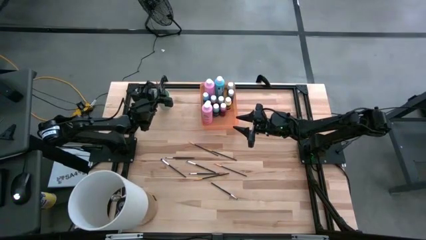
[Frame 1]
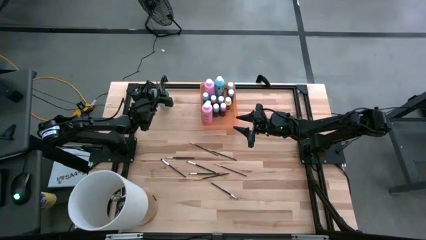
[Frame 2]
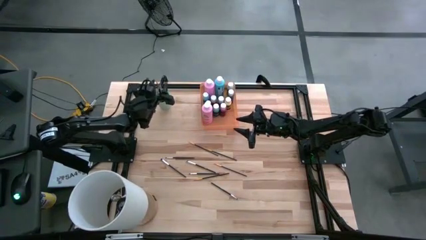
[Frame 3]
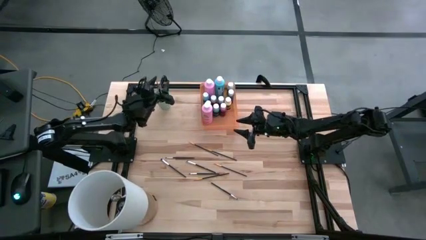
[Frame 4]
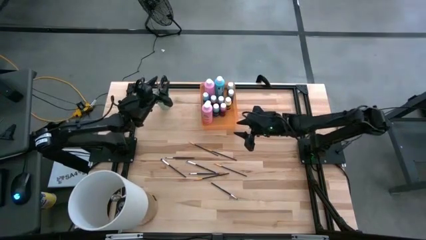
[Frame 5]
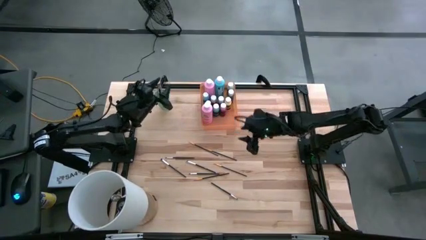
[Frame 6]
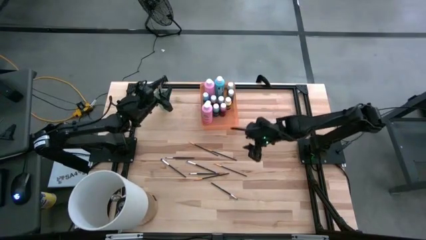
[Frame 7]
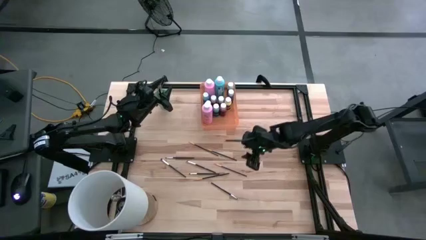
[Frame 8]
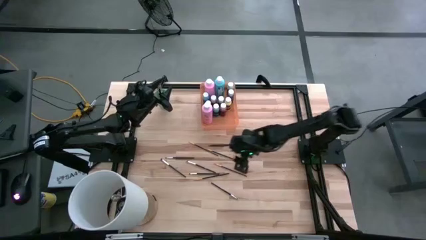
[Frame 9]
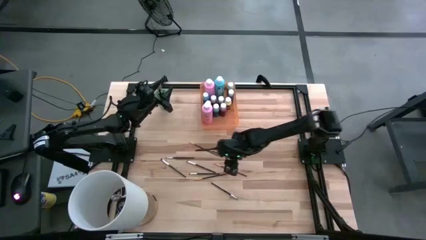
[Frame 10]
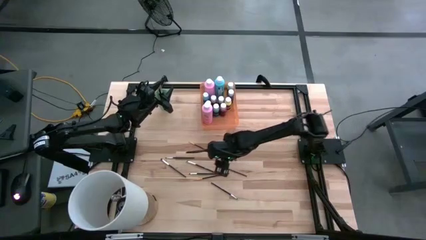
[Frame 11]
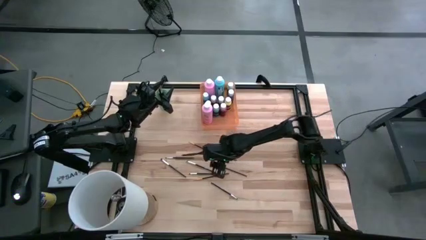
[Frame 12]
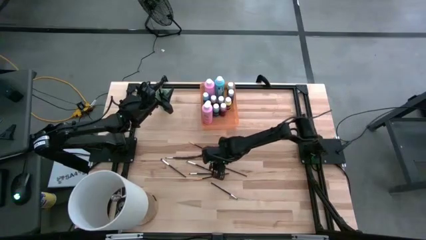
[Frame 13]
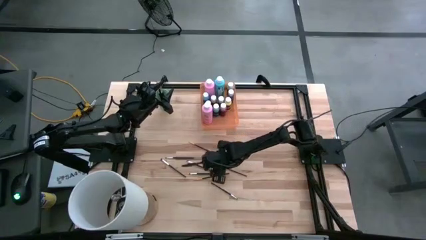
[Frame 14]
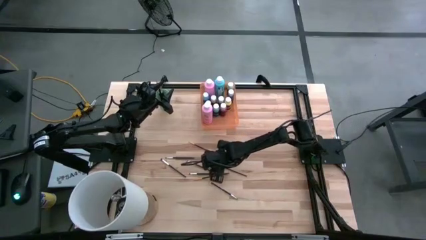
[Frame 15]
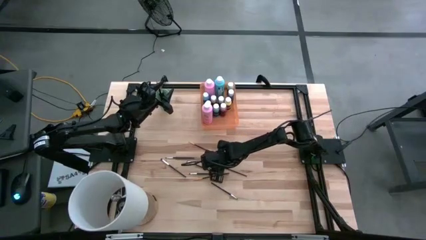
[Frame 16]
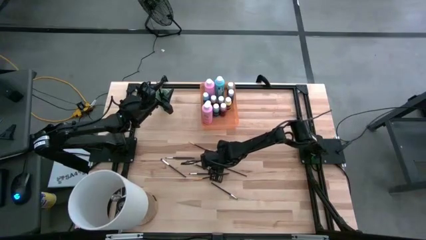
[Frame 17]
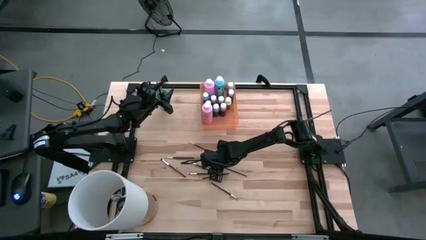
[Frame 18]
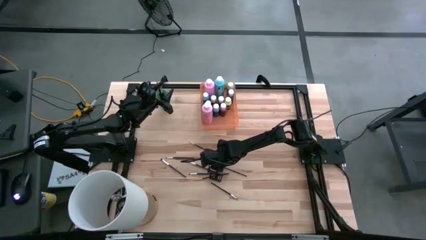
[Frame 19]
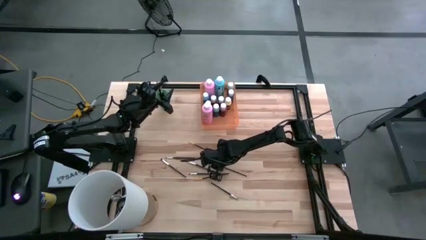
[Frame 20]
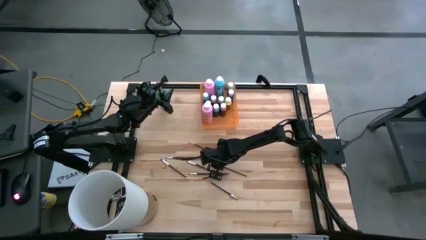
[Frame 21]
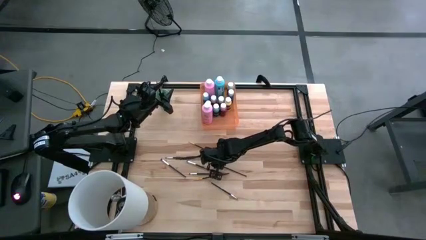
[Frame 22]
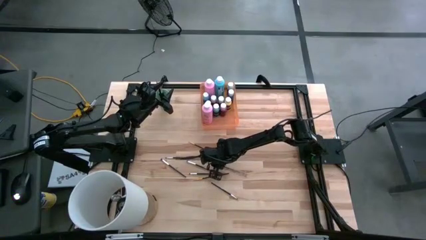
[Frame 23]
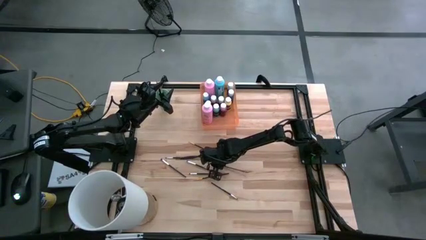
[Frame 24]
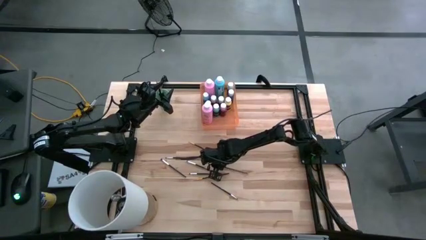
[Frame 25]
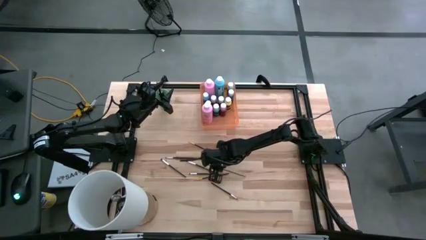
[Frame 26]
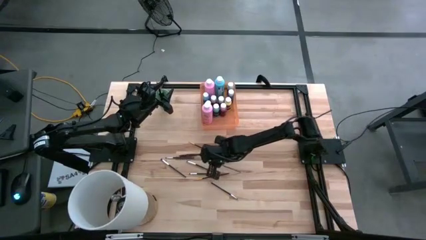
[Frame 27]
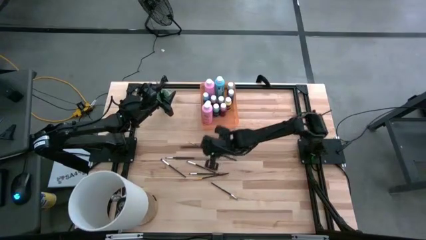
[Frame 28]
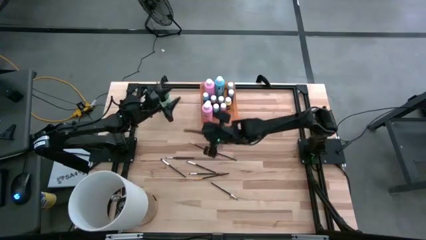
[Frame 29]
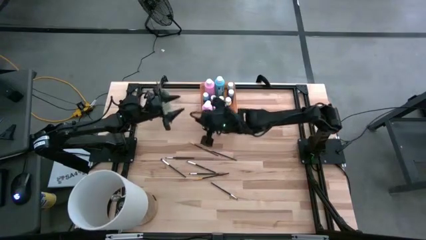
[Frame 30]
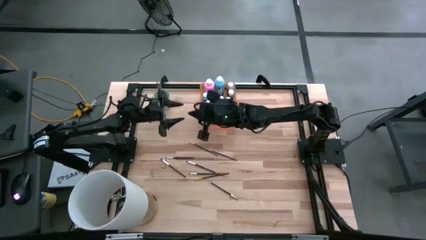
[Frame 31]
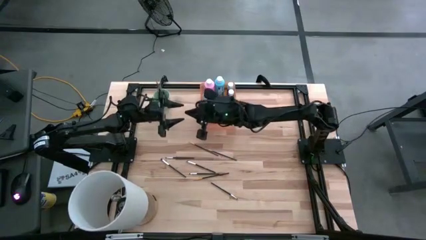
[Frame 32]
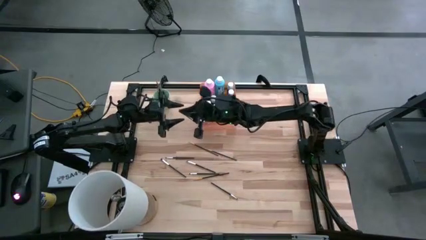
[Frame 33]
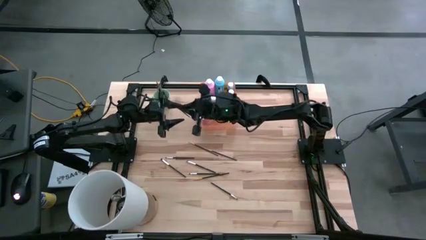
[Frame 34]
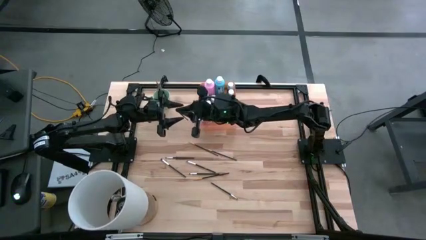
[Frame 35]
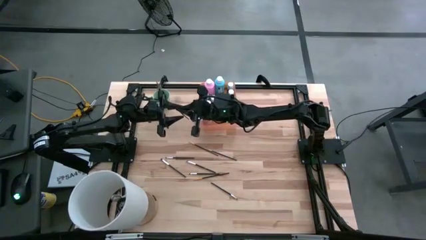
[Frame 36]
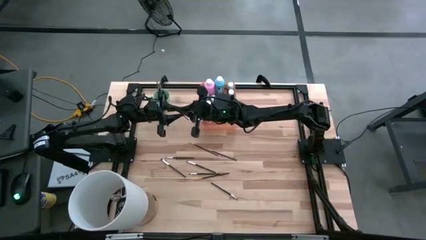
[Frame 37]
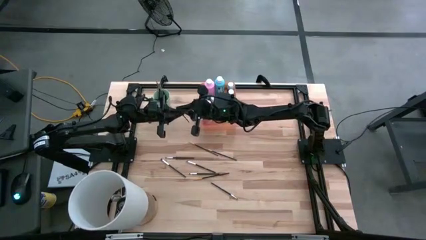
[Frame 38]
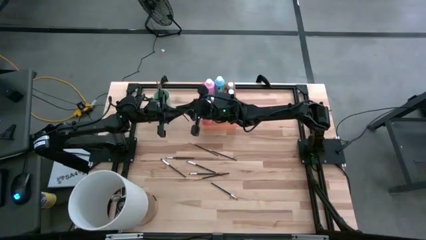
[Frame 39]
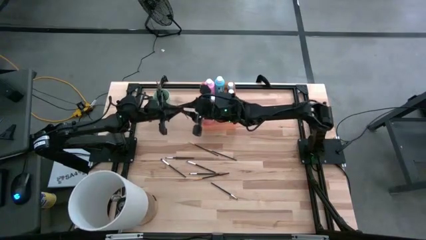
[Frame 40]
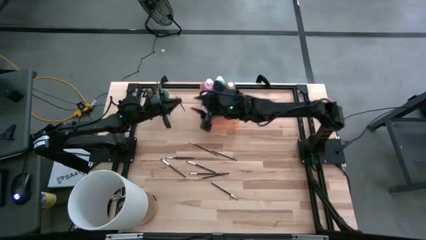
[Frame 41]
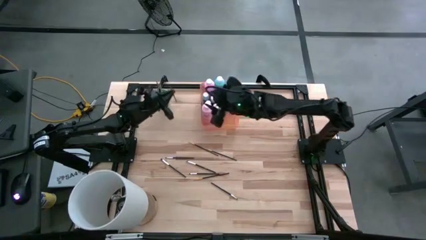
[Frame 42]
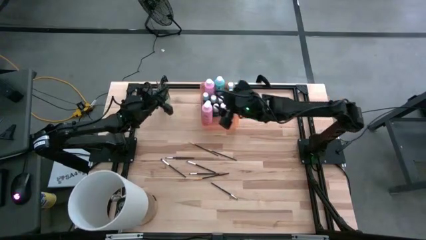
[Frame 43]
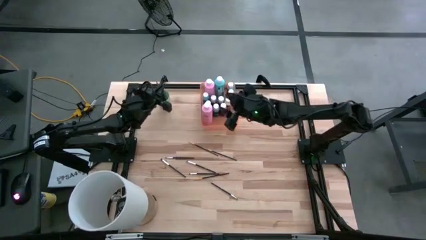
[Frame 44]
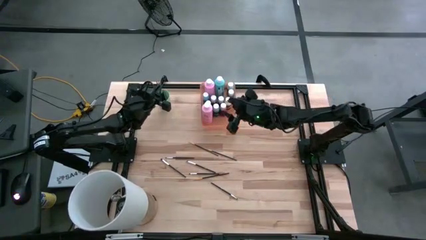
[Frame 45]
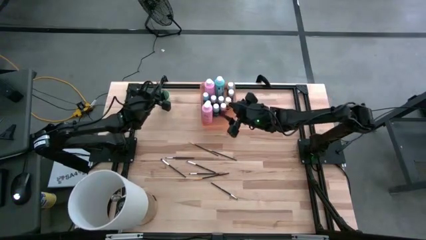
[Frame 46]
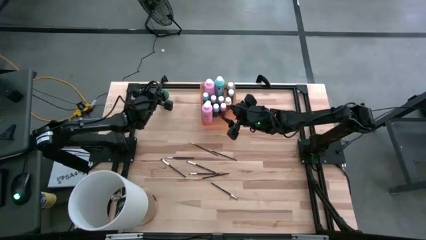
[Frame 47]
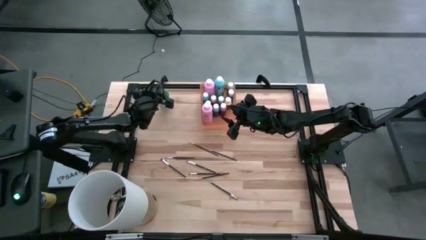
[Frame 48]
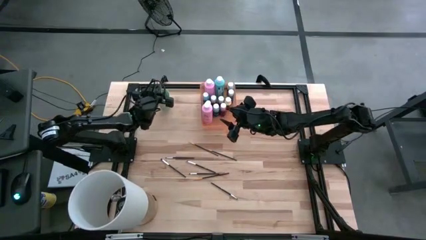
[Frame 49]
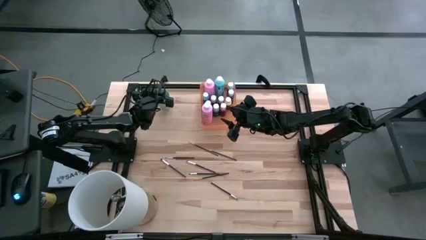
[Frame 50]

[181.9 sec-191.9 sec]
Task: Pick & Place Paint Supplies
Put the orange paintbrush into the cup
